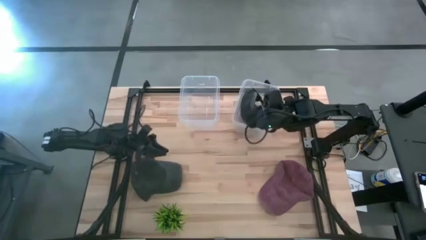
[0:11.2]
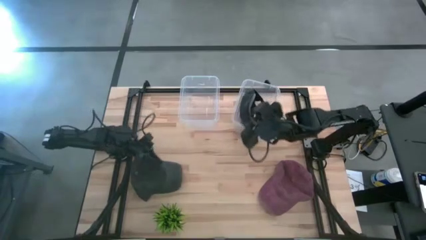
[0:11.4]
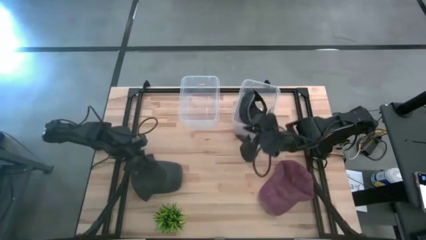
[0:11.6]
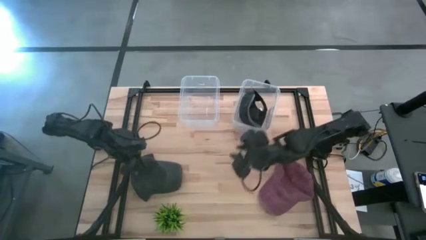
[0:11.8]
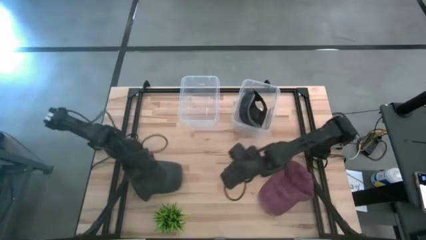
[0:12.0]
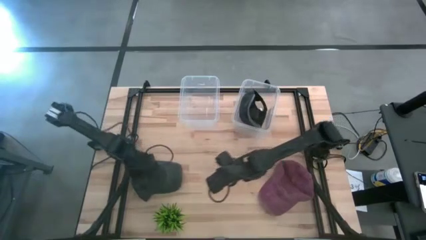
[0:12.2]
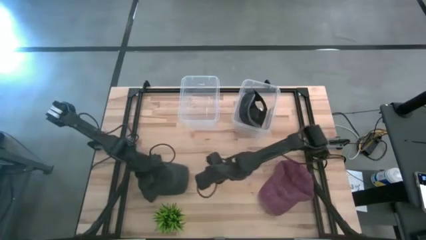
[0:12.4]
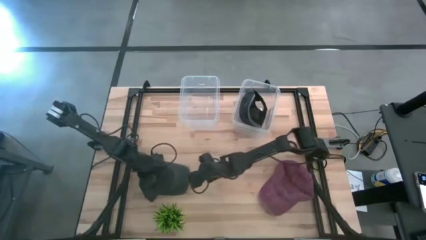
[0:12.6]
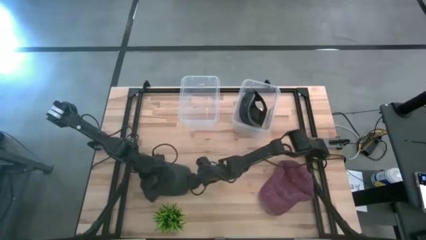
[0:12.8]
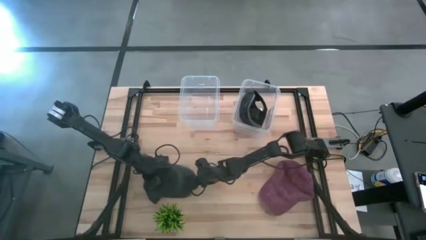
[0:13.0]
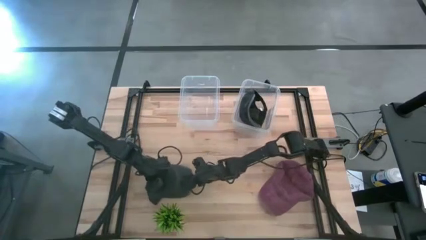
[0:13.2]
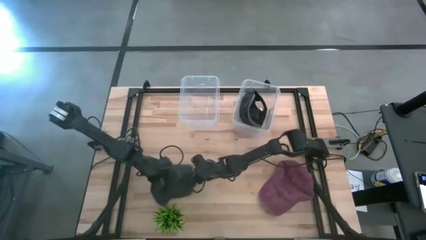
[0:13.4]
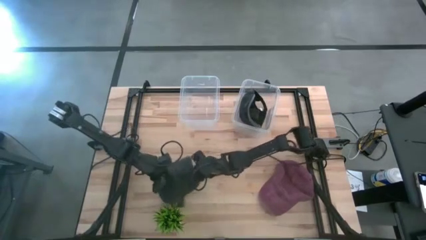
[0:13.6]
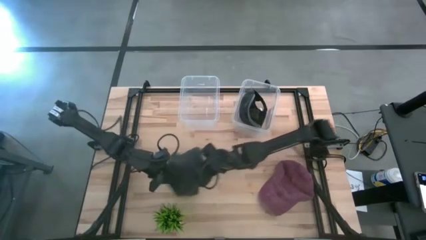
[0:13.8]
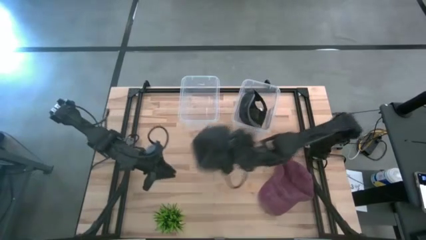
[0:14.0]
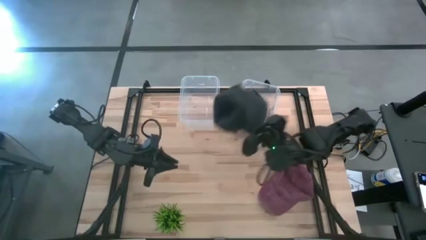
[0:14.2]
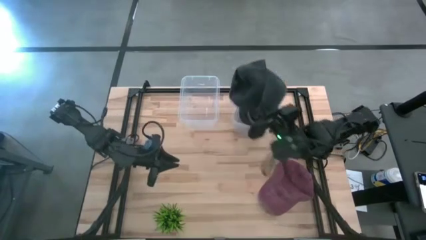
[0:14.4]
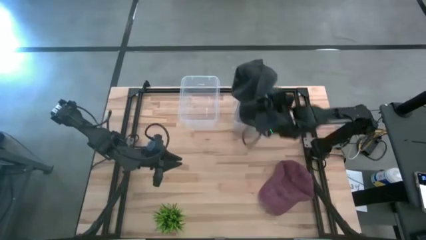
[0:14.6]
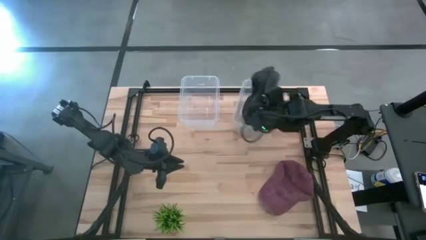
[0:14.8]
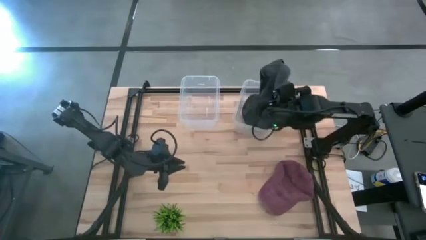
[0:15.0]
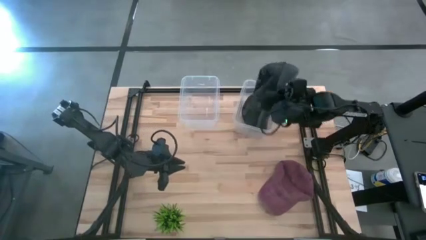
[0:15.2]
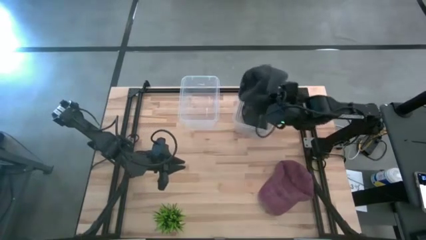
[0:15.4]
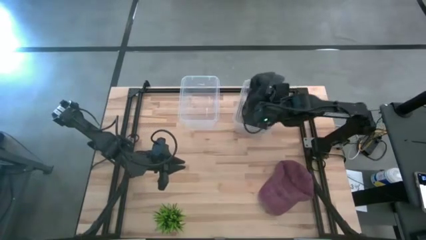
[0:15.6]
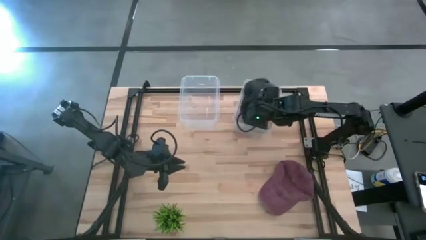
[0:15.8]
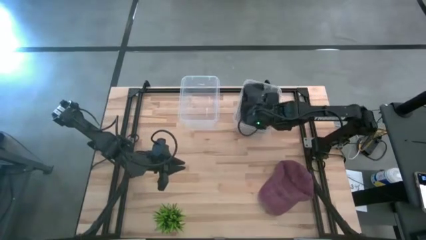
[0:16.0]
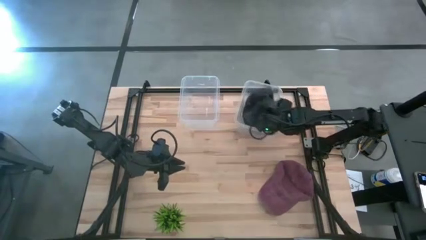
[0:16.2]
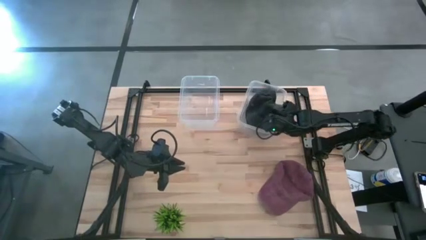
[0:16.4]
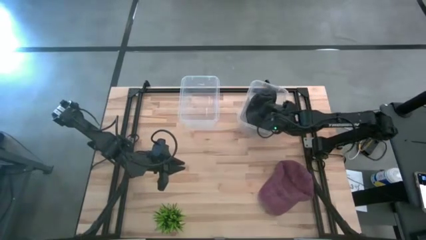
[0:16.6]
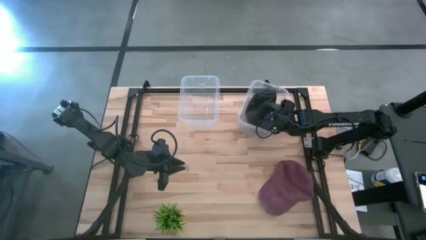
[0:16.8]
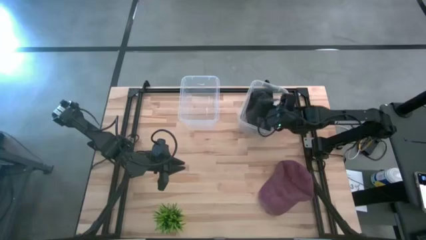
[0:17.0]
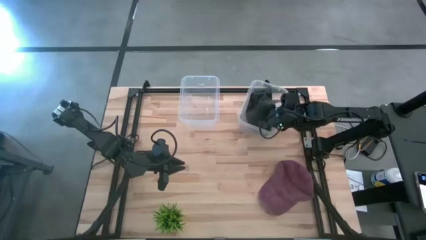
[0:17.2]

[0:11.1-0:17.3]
Task: Pick & Place hat
Put the black cap into the right transparent bin

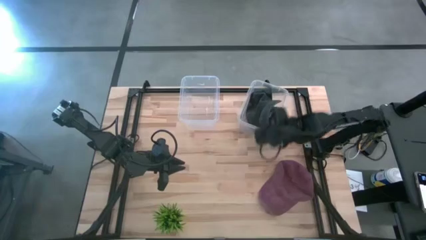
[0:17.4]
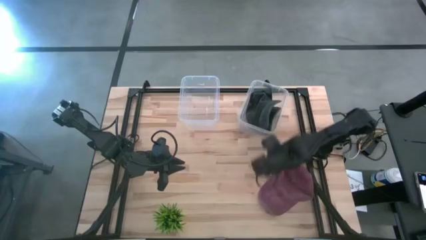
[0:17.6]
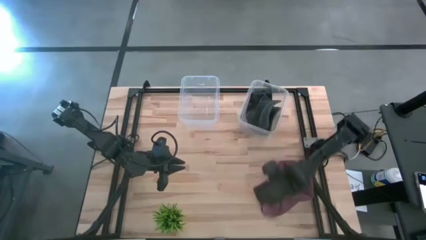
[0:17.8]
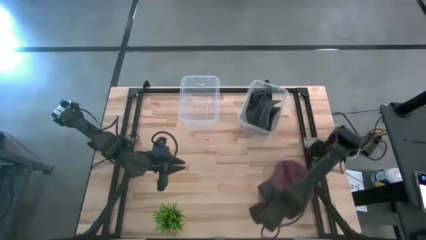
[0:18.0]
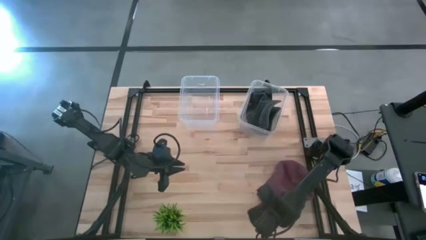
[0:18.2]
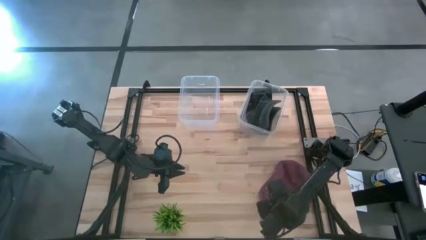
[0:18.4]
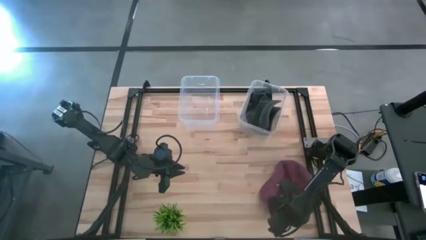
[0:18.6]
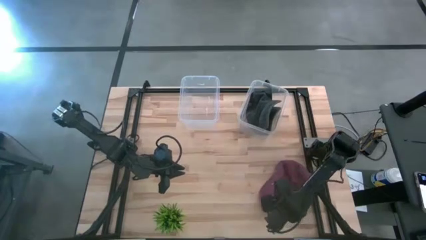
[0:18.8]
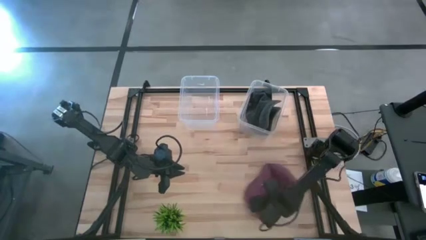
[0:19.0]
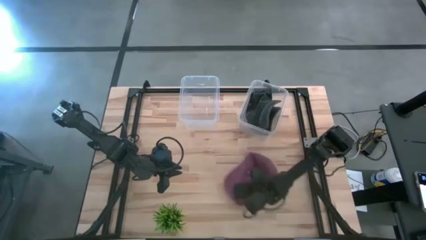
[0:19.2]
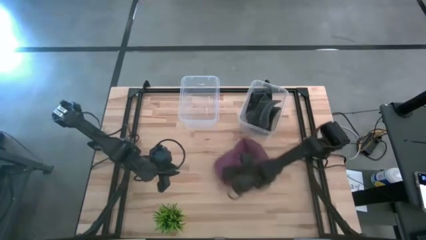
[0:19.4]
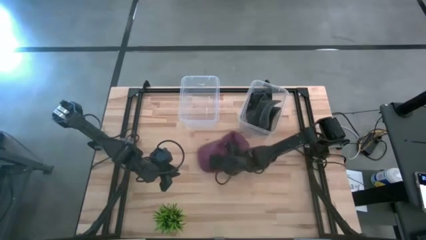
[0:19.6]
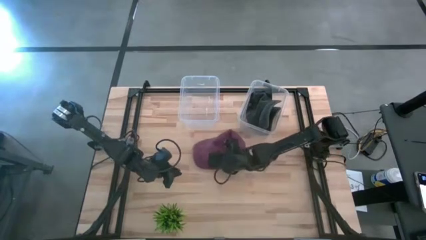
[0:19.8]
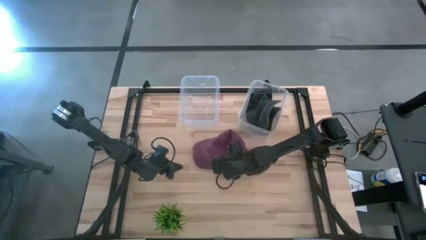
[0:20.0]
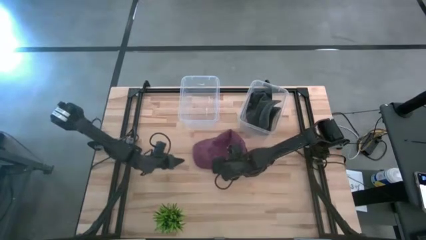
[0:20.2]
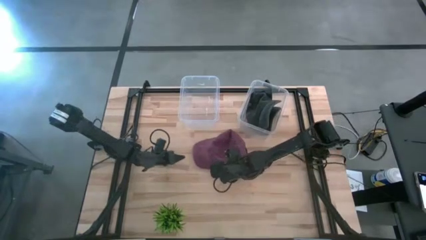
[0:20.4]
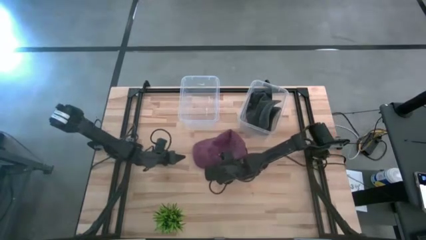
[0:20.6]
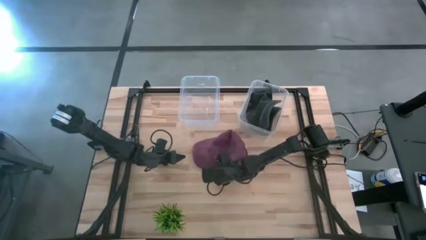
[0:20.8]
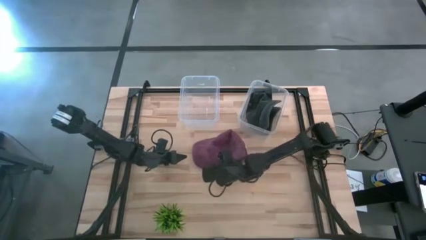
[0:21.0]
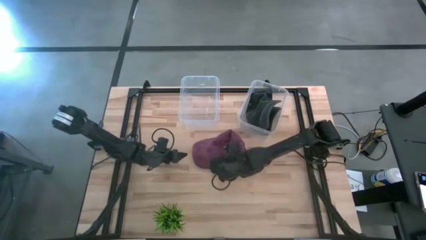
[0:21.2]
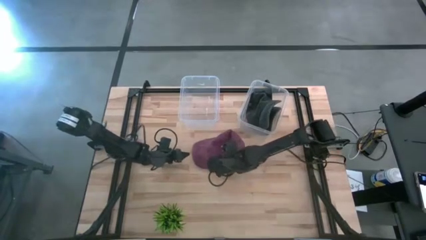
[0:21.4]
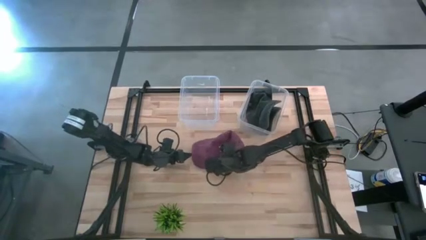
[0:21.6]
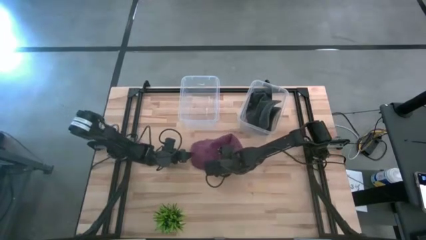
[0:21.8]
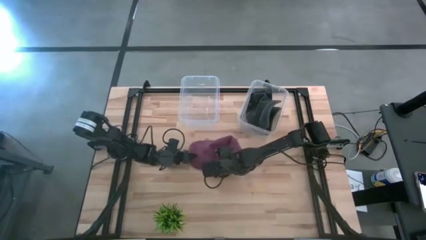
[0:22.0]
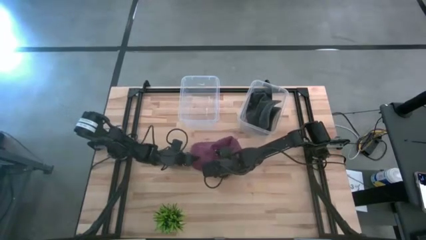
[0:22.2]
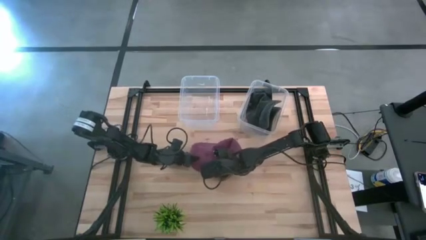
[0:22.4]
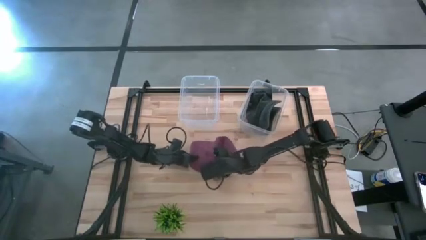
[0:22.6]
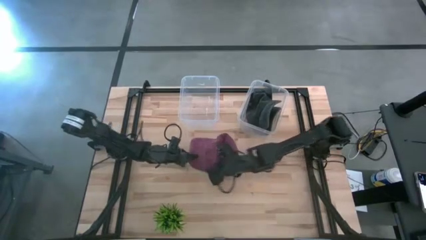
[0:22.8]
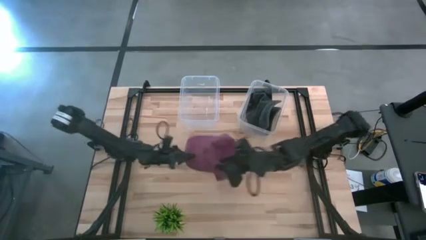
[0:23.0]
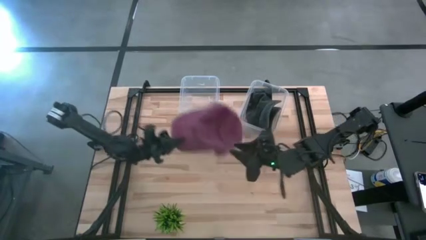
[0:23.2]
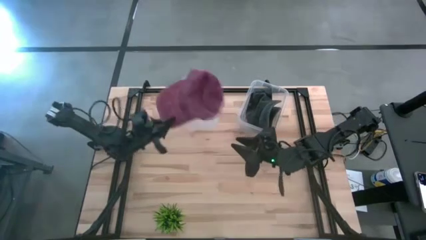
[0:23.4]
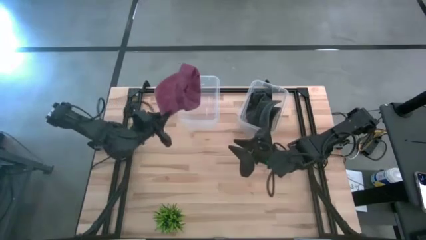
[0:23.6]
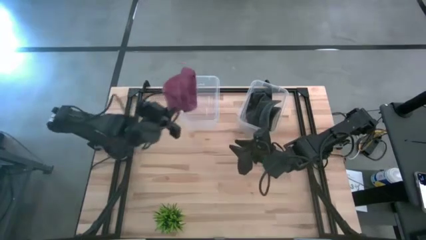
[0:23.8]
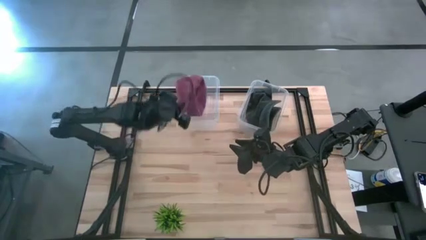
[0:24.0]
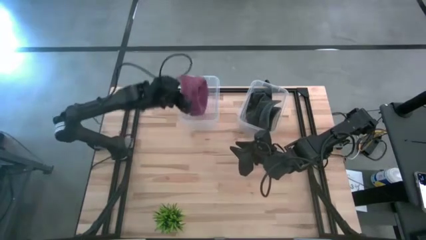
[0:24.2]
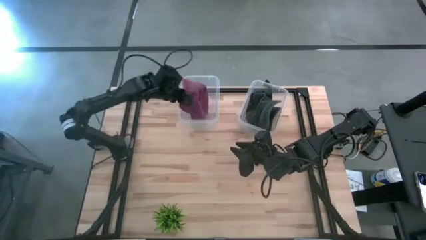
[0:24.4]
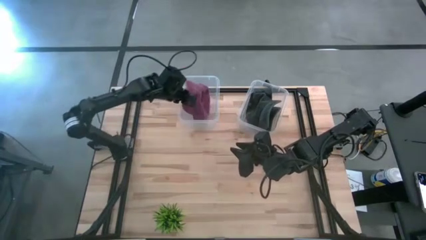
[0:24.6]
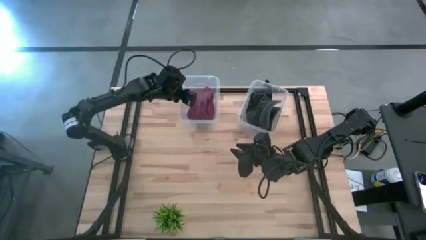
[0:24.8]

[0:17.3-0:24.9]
Put the red cap into the left transparent bin

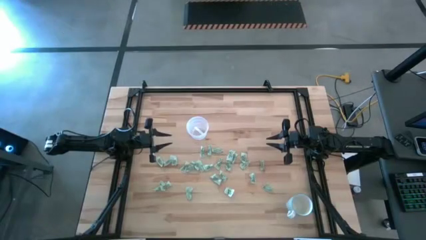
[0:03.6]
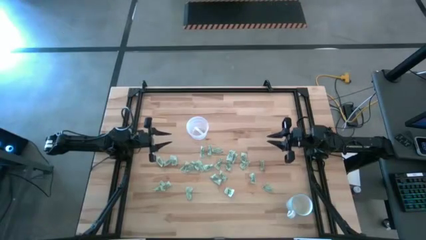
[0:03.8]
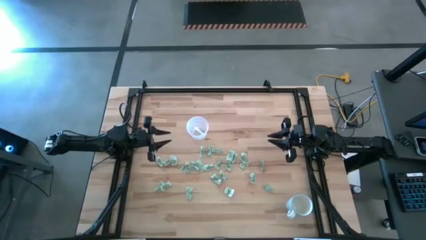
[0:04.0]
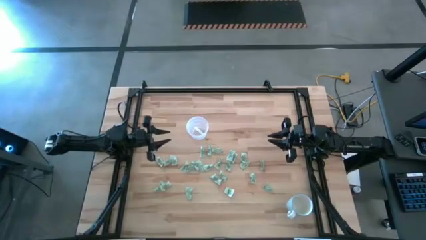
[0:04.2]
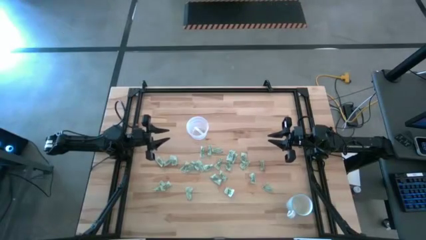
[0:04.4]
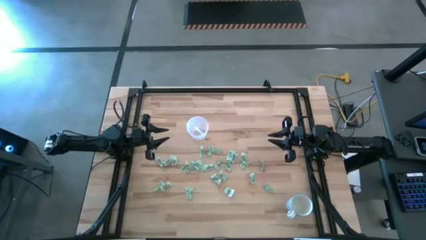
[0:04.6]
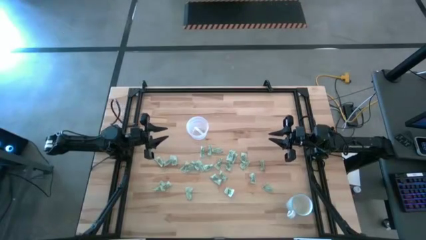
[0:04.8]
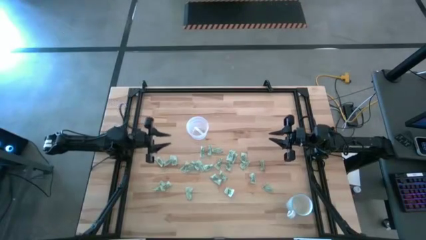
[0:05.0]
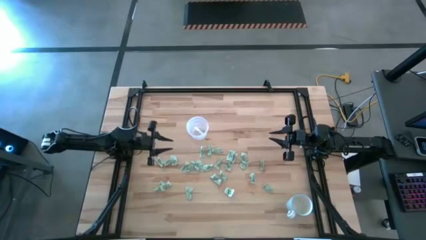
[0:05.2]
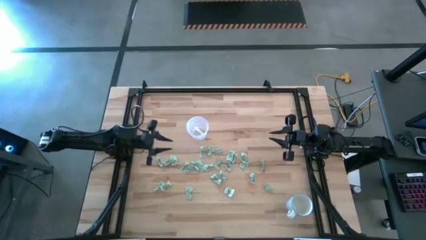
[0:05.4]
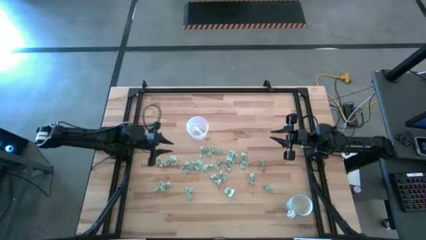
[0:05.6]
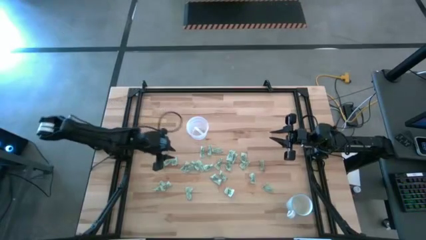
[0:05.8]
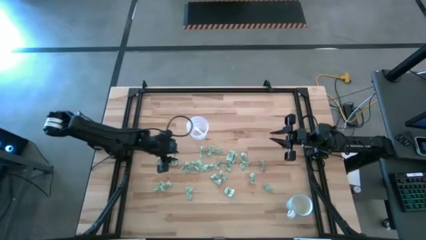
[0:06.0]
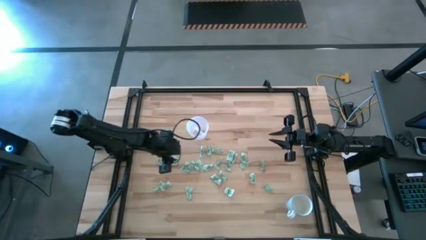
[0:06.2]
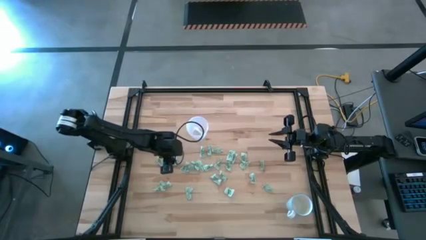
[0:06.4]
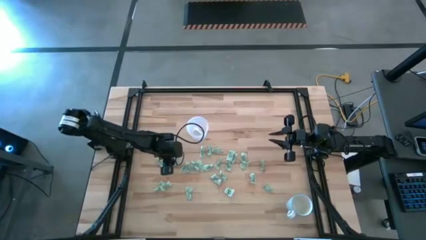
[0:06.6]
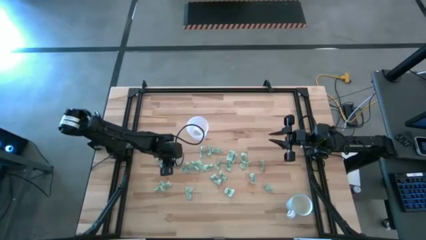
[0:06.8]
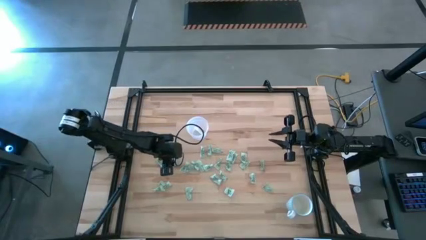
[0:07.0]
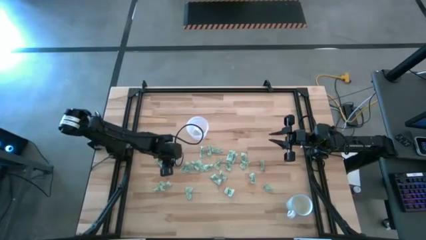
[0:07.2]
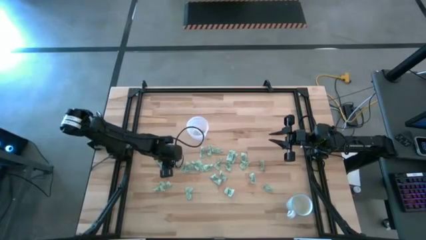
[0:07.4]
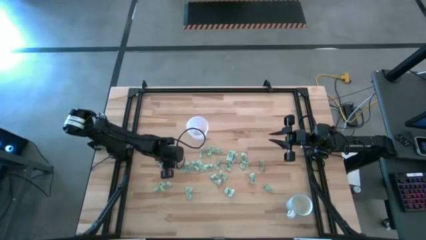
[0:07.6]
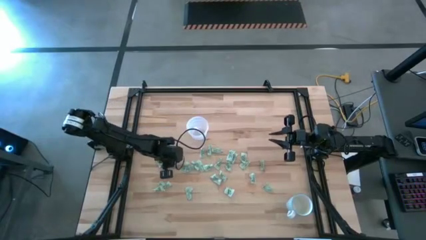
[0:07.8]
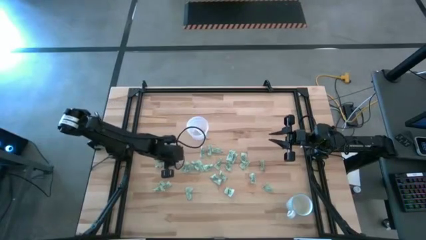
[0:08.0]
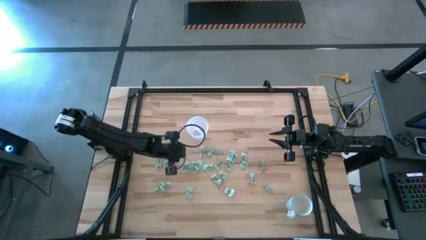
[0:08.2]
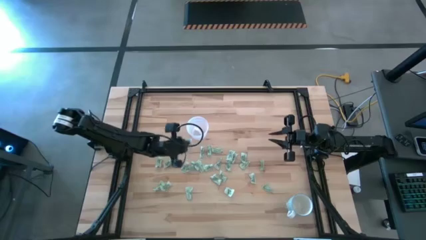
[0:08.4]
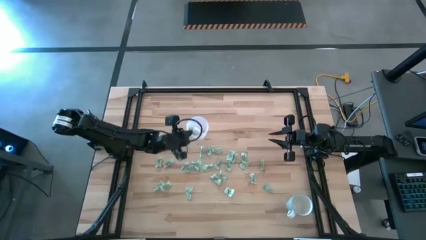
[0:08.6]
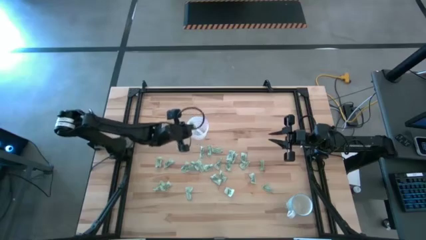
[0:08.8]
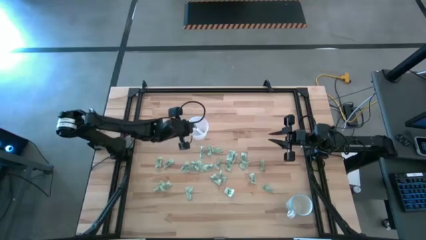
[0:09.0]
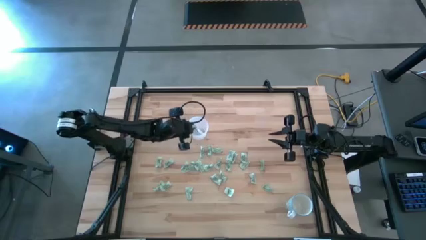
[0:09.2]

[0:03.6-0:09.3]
Task: Pick and place Stevia / Truvia into bins
Put the stevia packet into the transparent container
